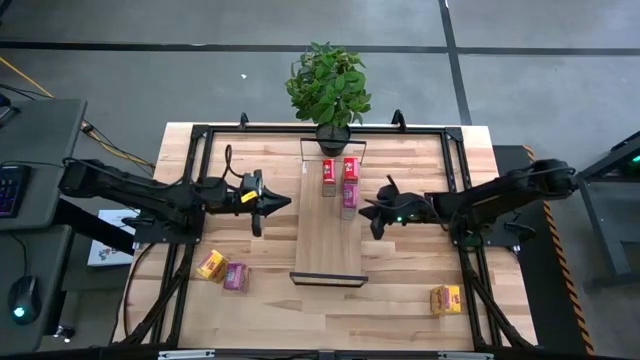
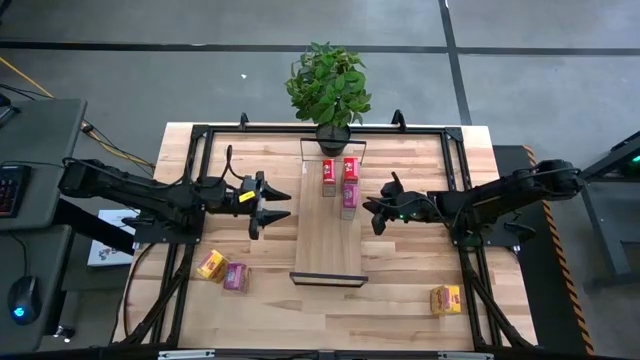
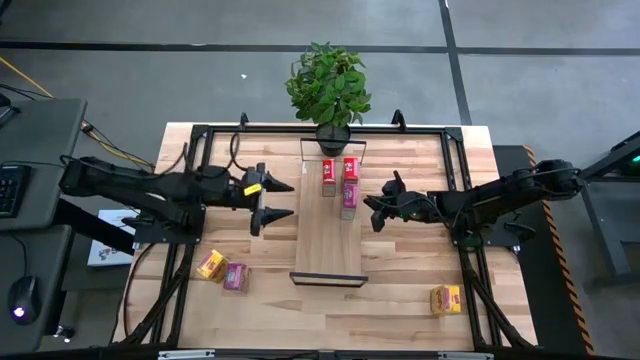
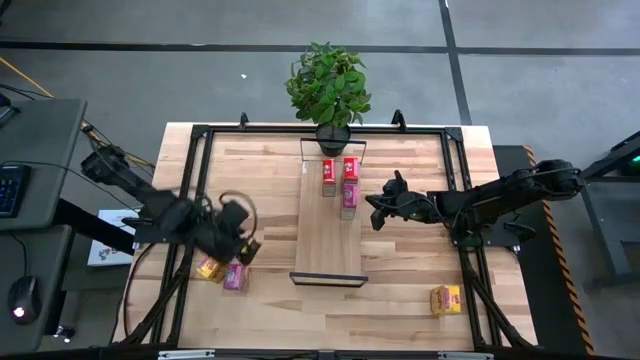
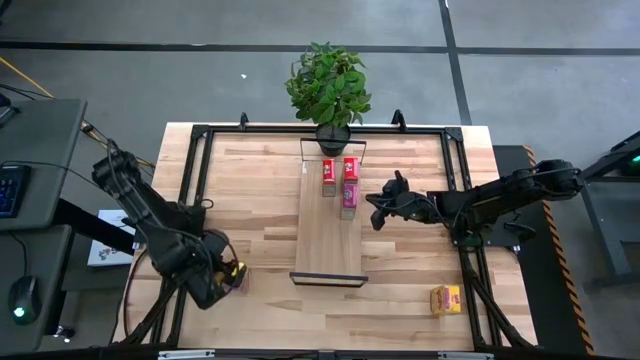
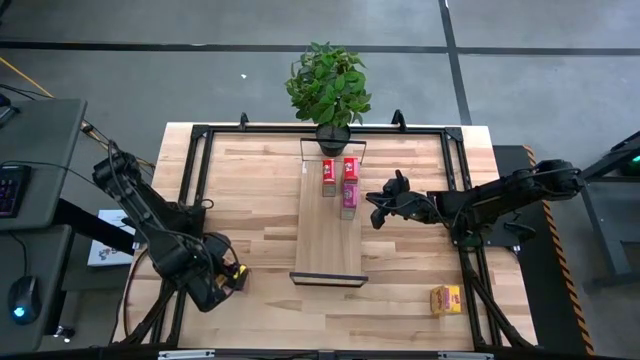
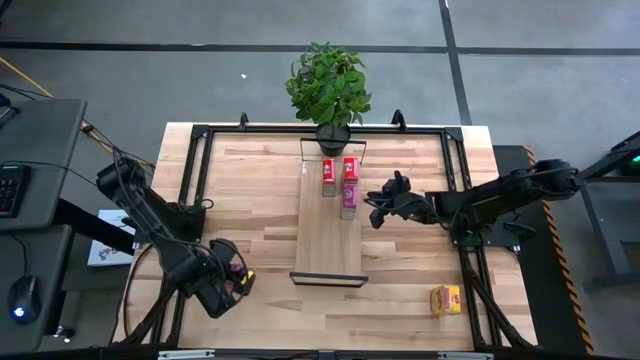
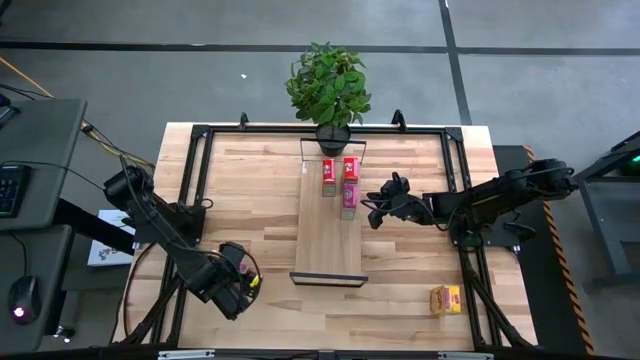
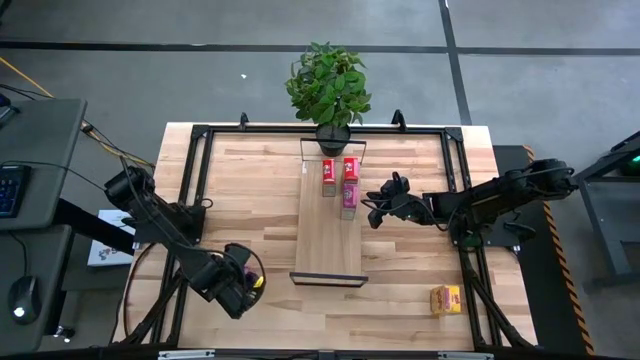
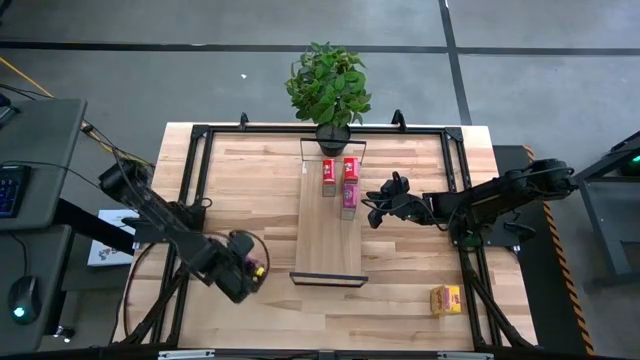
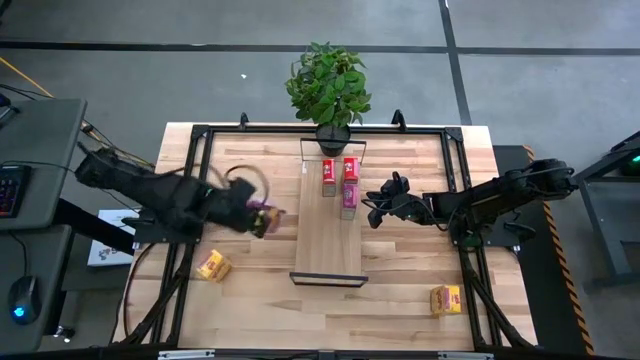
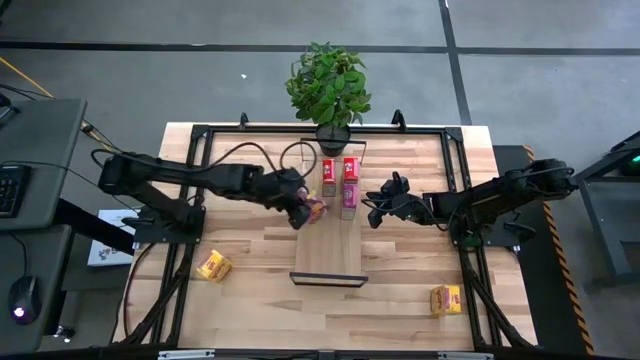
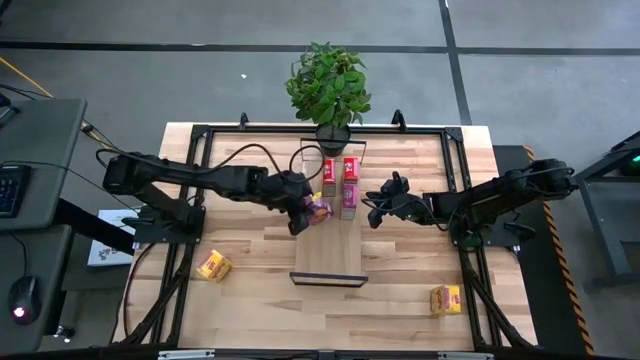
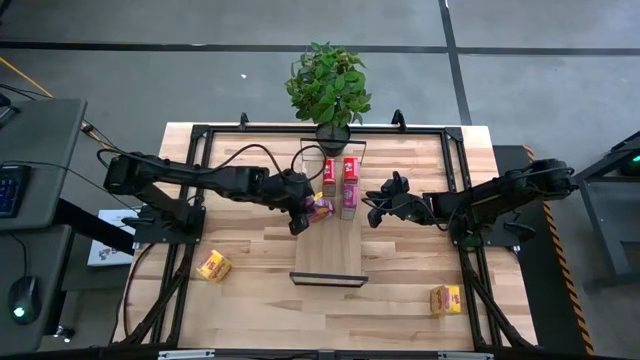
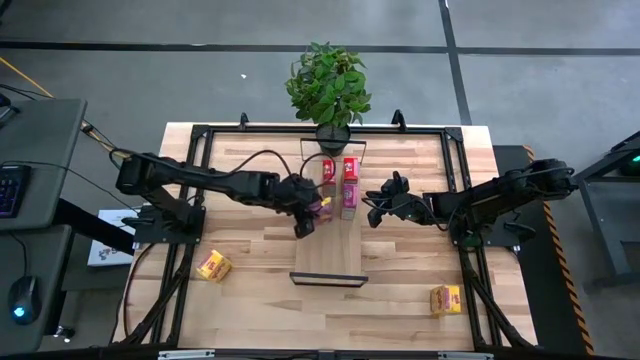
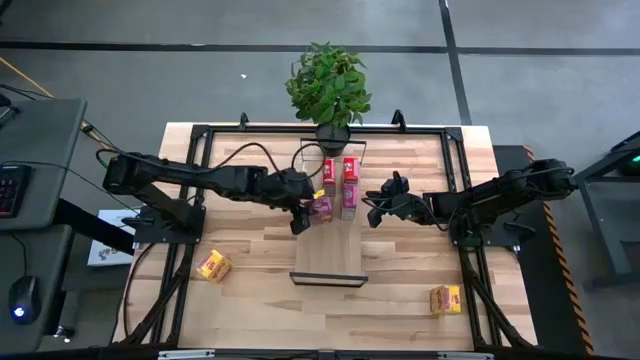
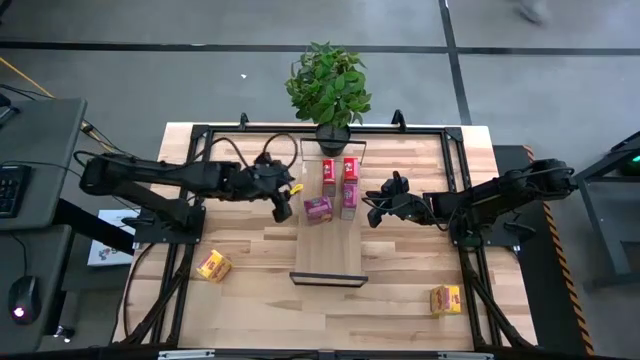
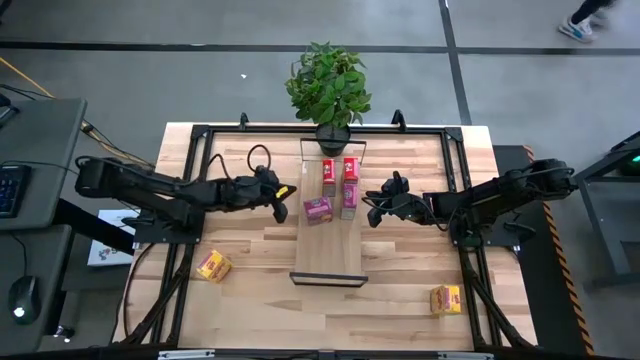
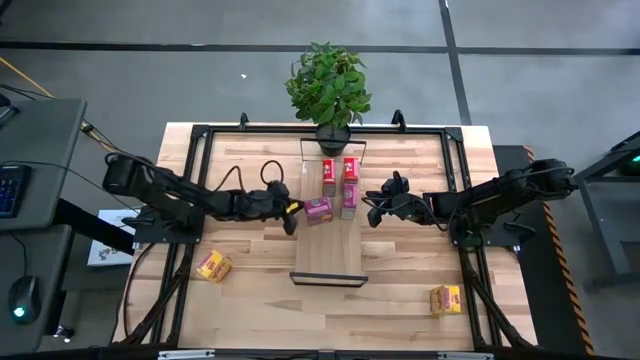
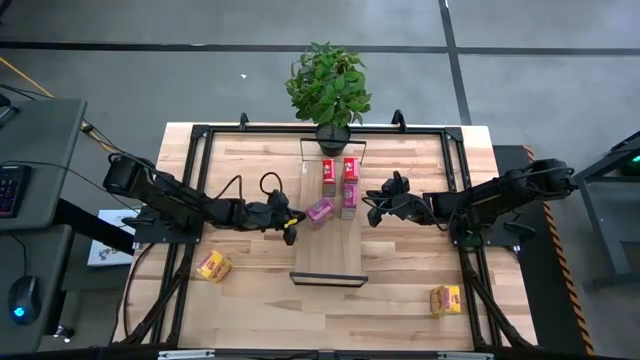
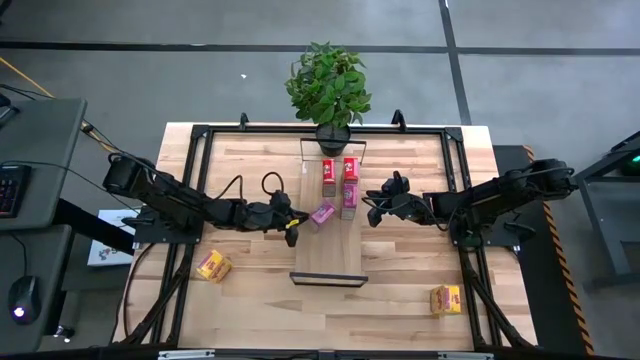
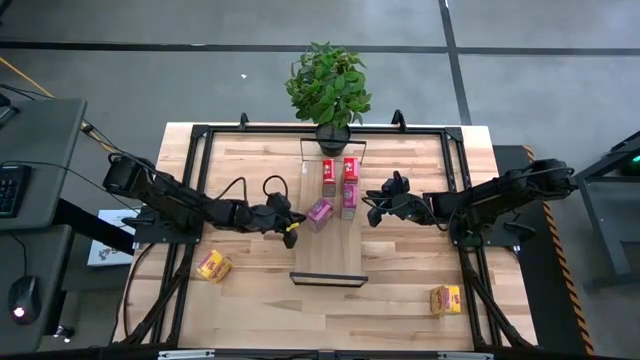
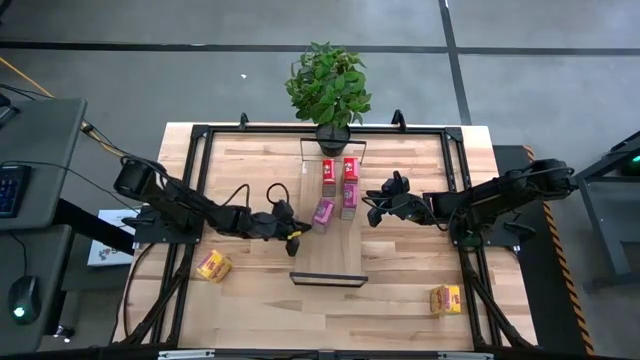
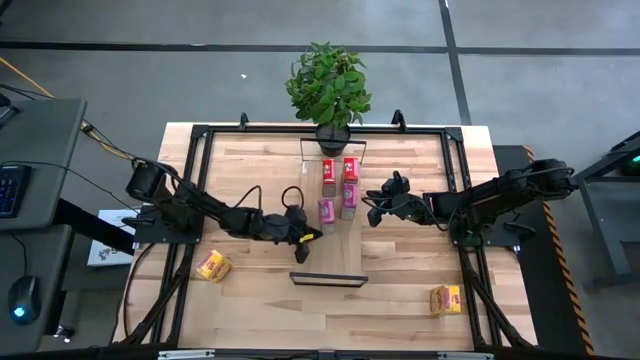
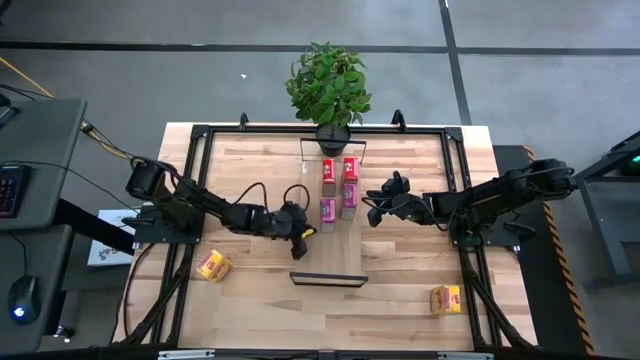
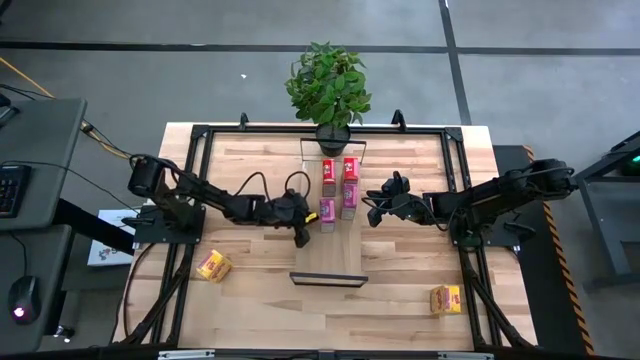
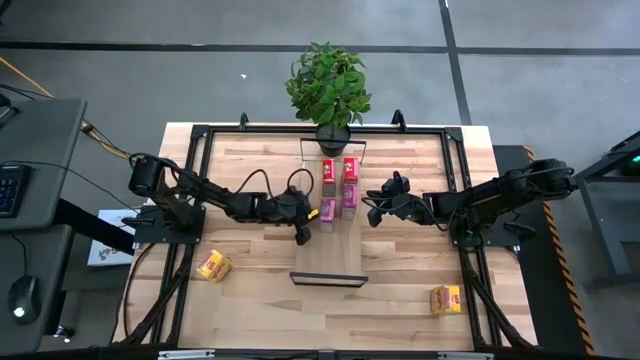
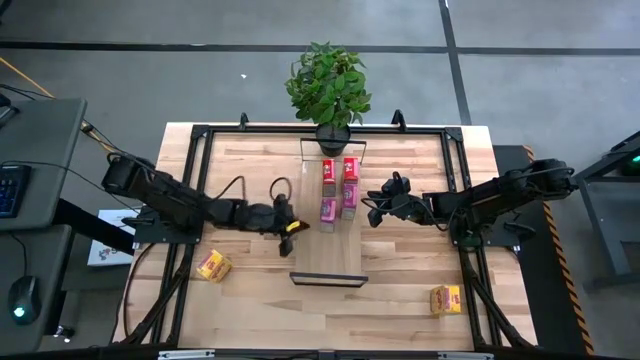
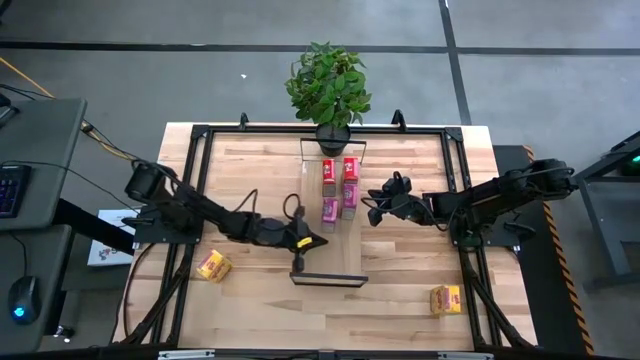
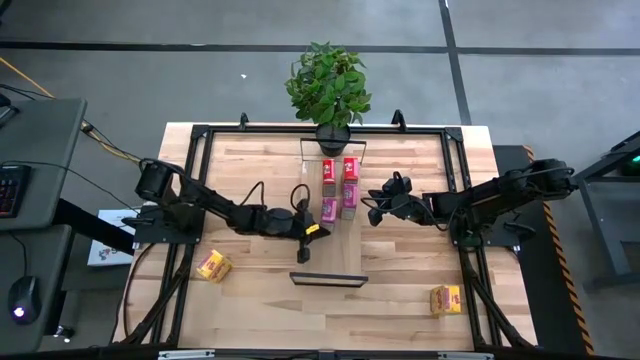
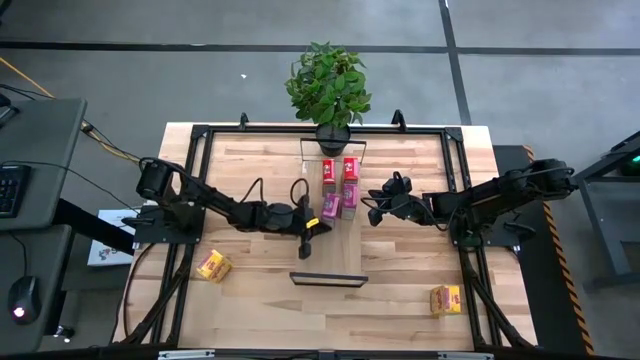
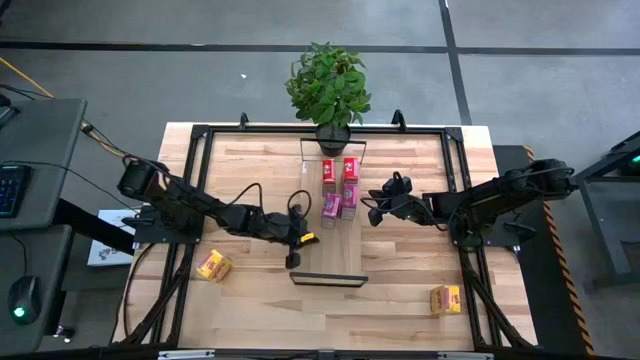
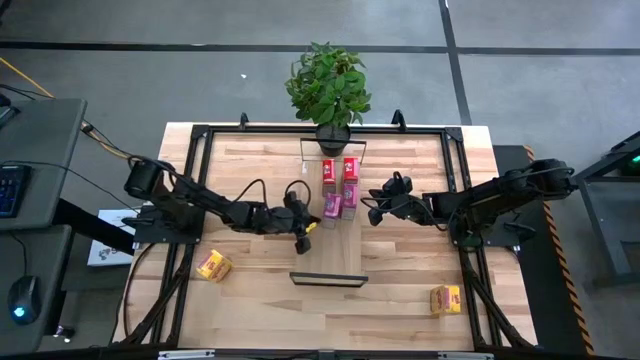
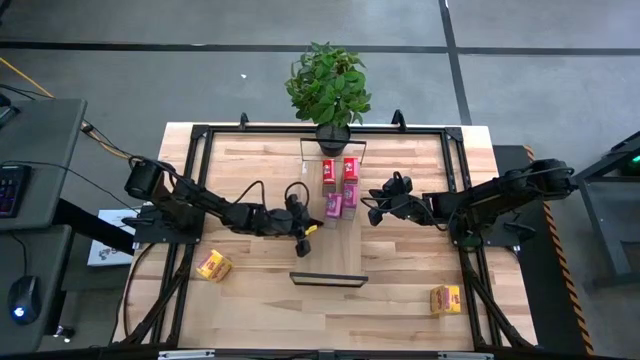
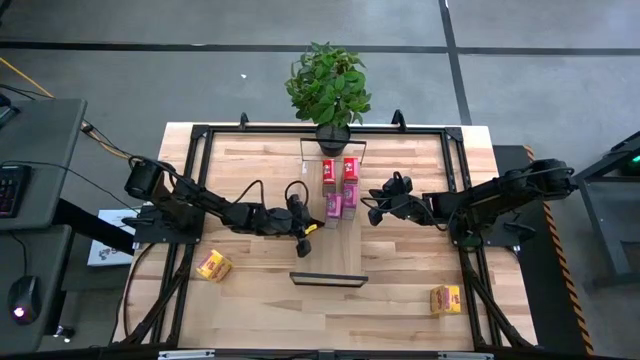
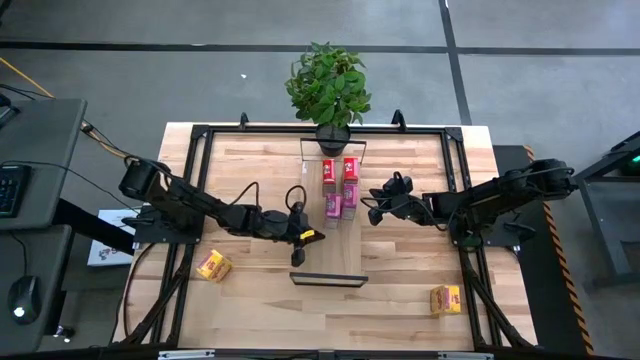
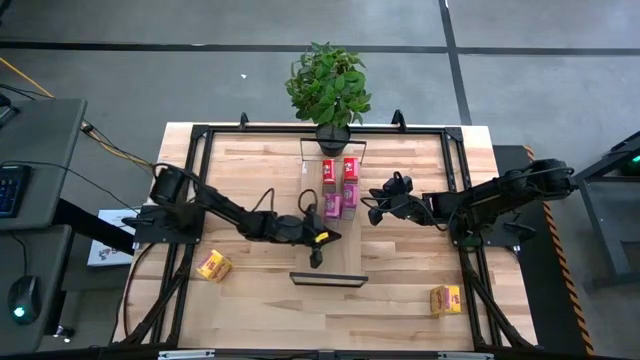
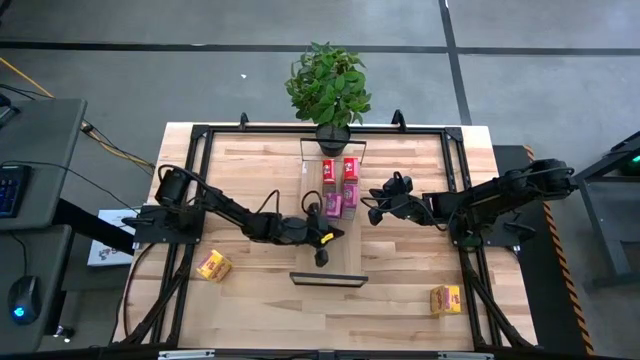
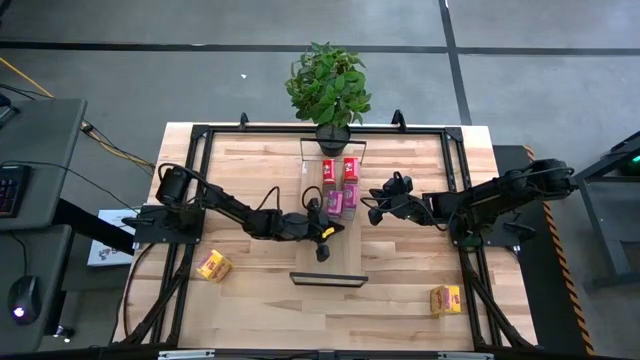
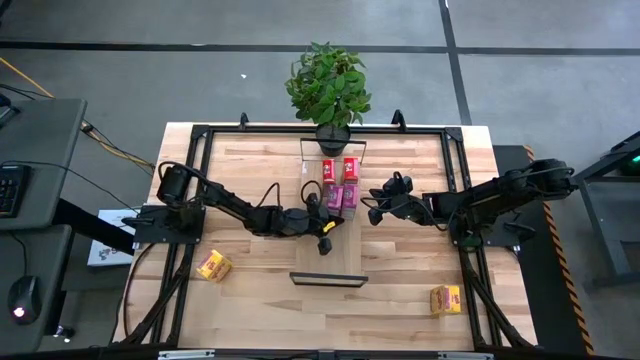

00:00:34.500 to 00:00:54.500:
Task: Stack cereal on shelf
Put the violet cereal box on the shelf aligned with the other violet cereal box

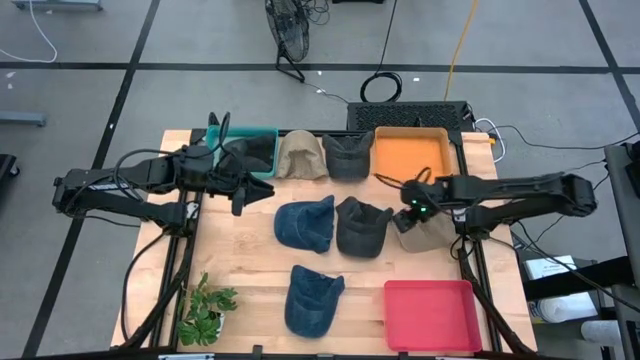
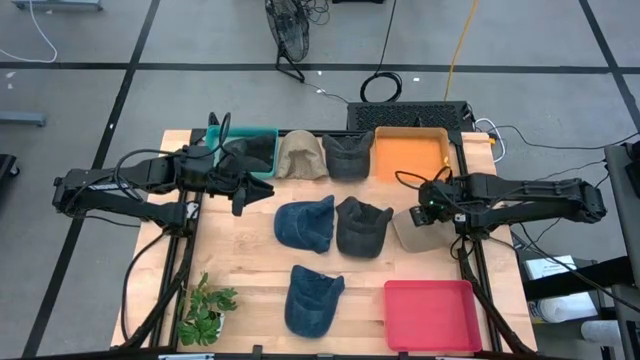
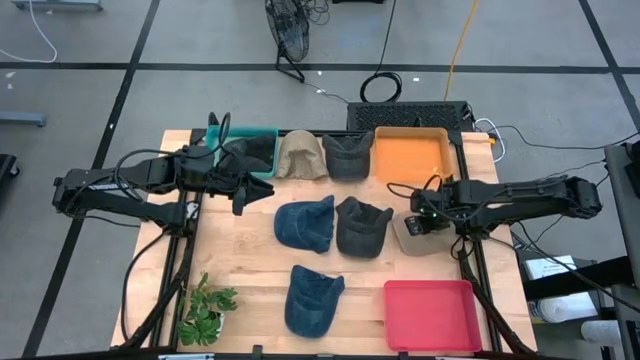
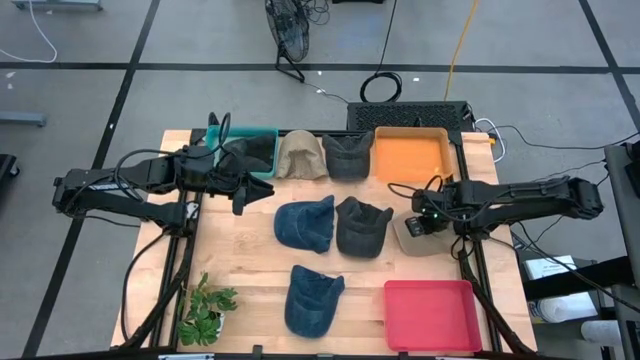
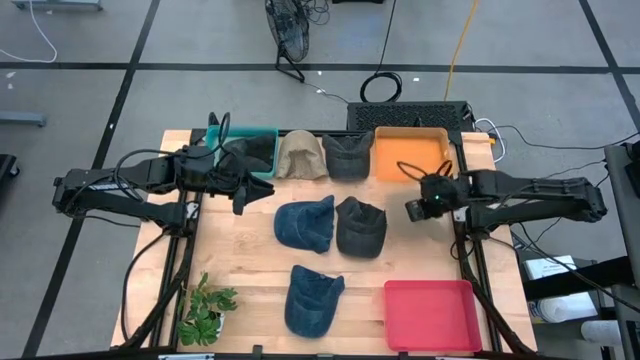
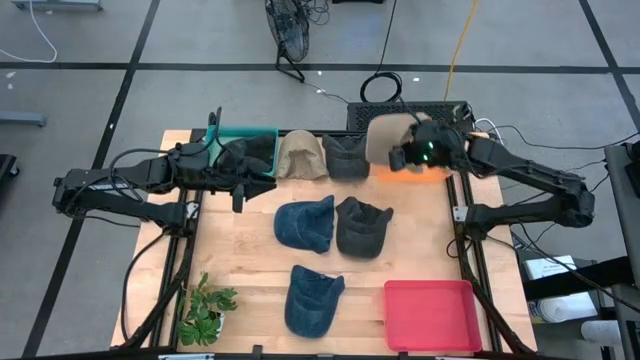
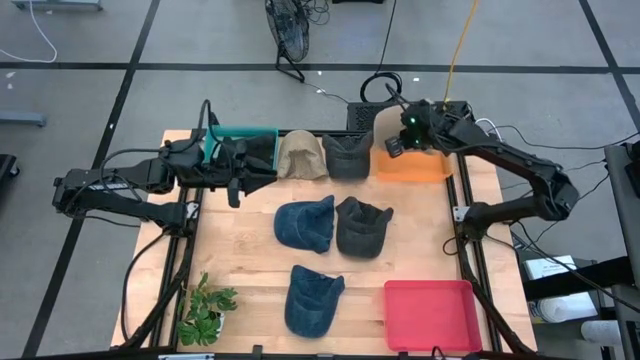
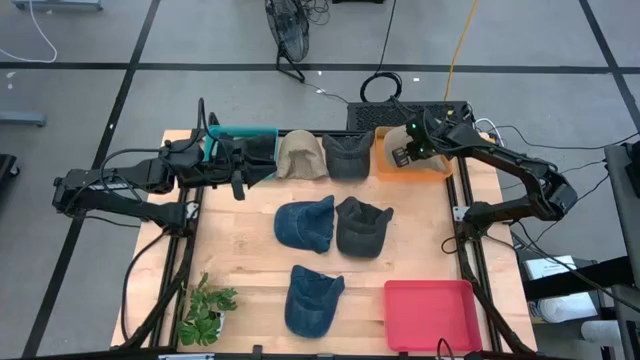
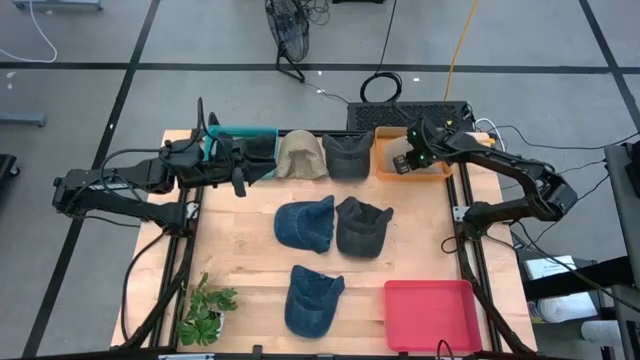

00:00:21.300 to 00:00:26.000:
Task: Pick & Place hat
Put the right brown cap into the orange bin
